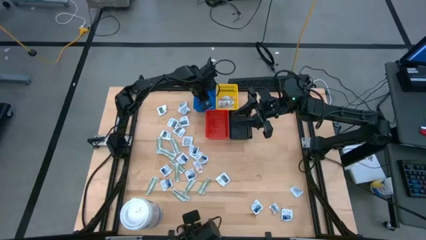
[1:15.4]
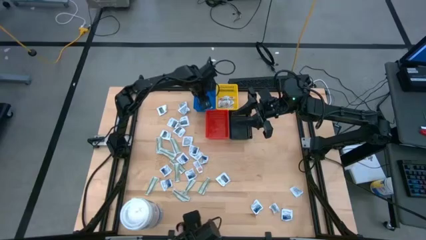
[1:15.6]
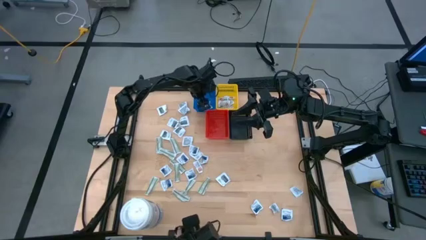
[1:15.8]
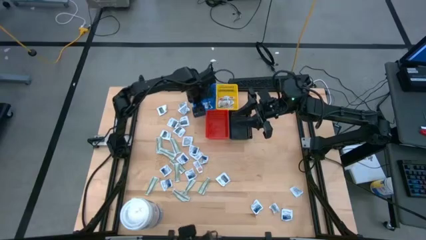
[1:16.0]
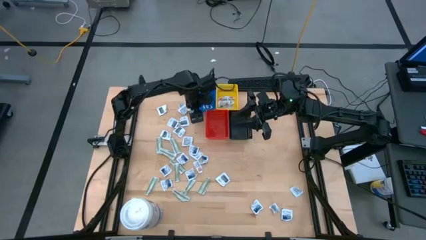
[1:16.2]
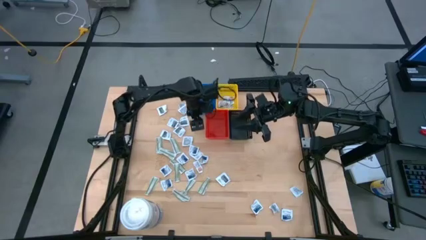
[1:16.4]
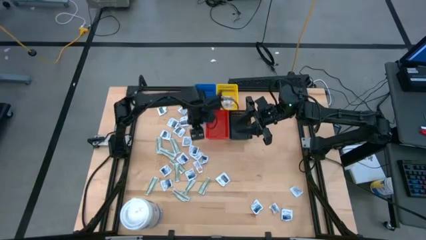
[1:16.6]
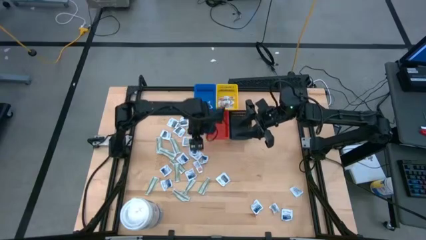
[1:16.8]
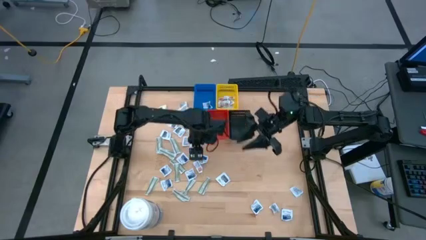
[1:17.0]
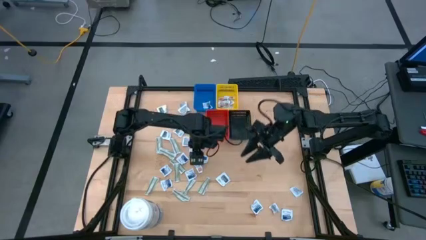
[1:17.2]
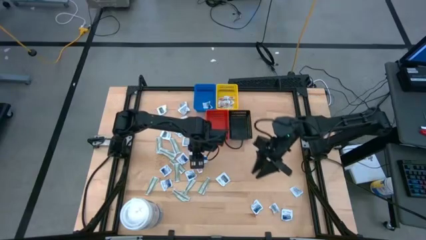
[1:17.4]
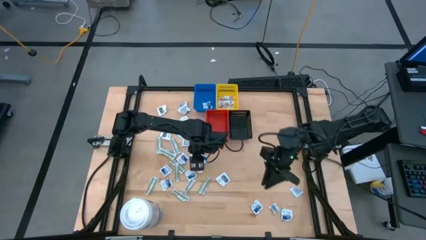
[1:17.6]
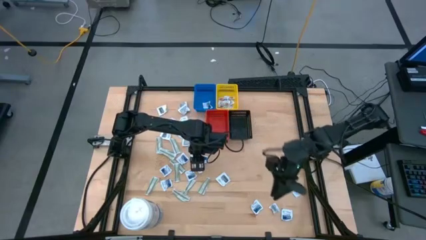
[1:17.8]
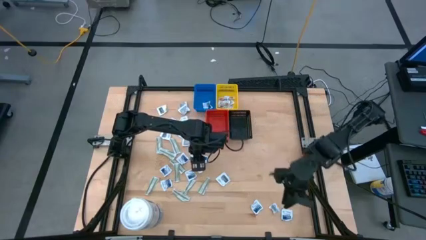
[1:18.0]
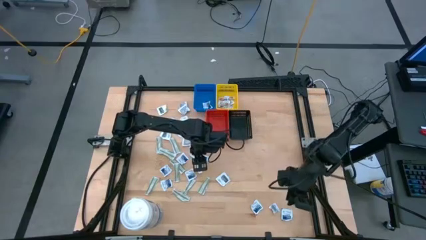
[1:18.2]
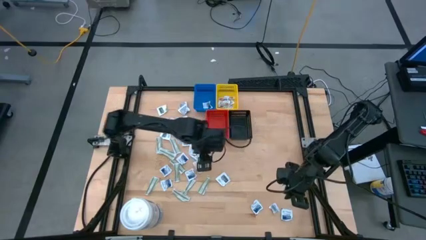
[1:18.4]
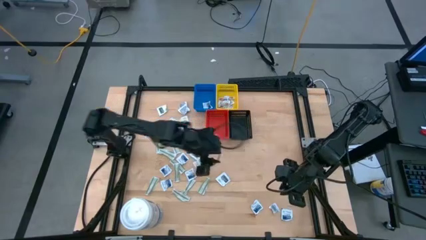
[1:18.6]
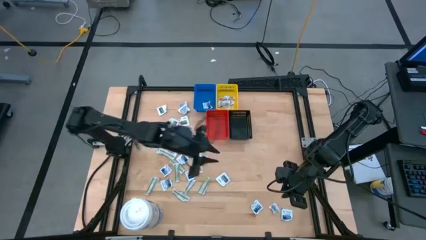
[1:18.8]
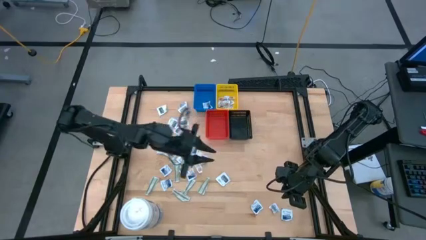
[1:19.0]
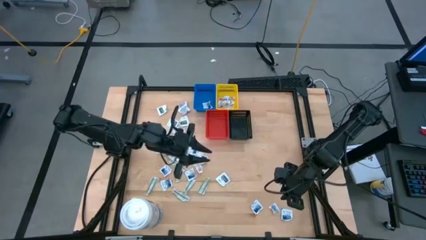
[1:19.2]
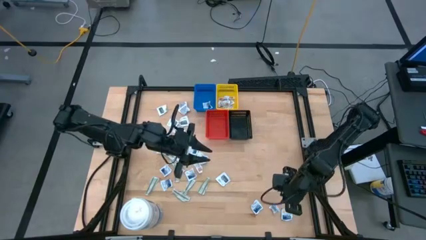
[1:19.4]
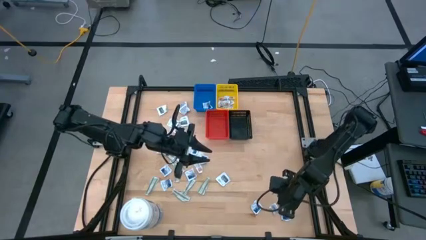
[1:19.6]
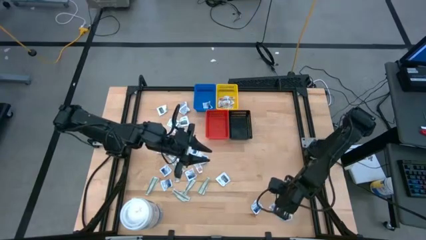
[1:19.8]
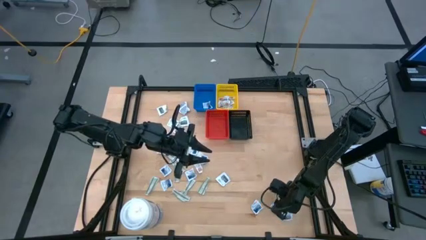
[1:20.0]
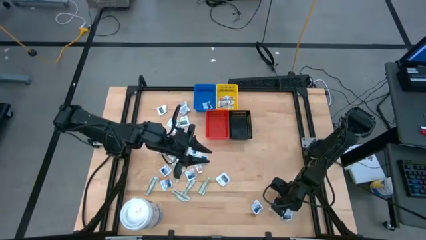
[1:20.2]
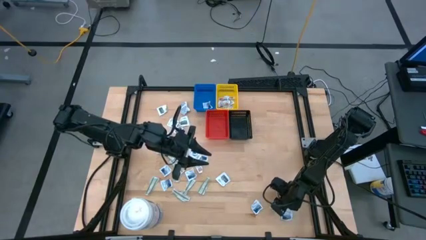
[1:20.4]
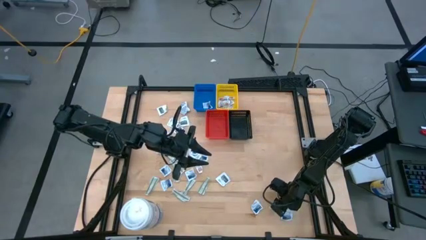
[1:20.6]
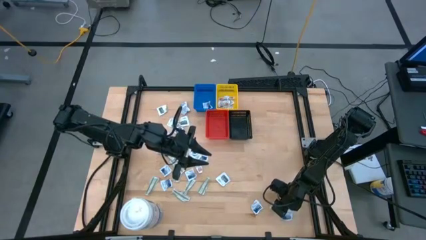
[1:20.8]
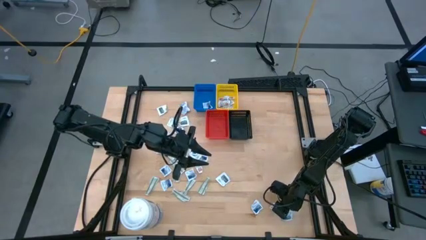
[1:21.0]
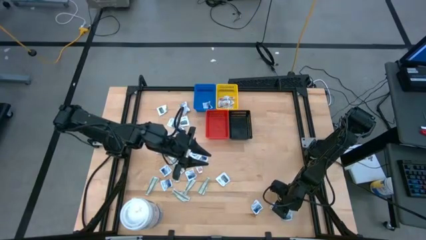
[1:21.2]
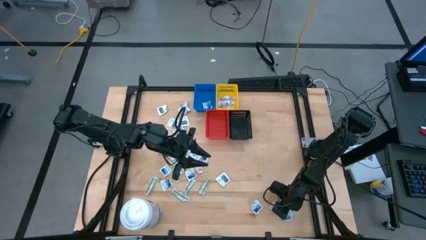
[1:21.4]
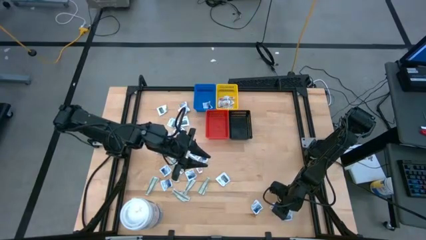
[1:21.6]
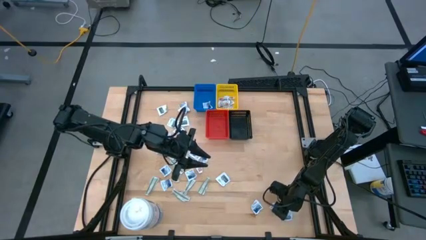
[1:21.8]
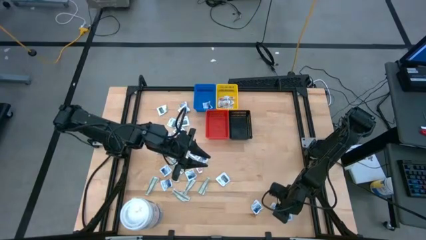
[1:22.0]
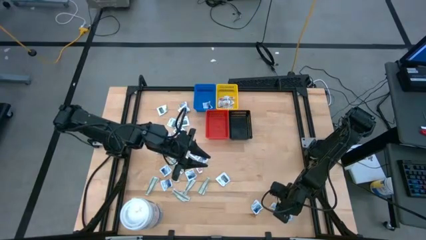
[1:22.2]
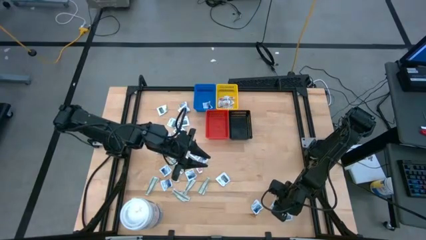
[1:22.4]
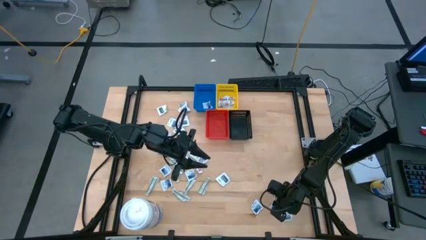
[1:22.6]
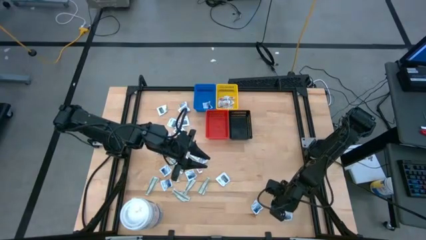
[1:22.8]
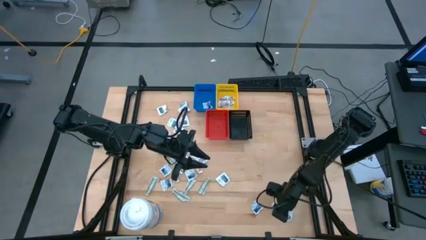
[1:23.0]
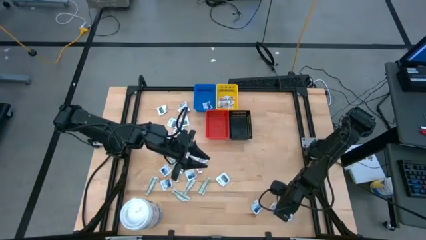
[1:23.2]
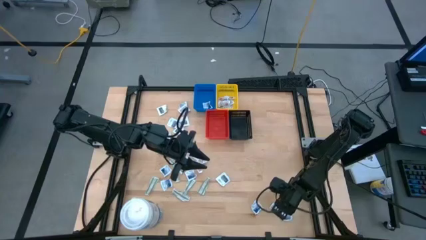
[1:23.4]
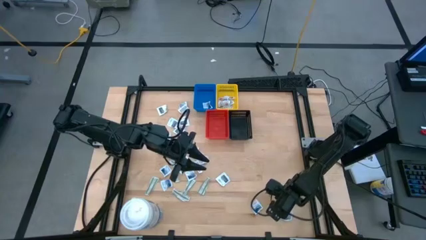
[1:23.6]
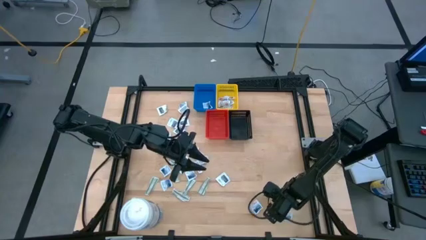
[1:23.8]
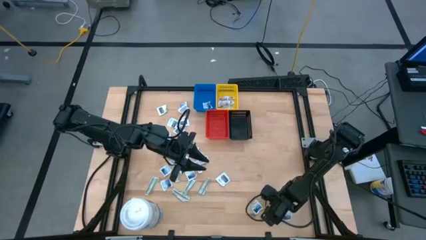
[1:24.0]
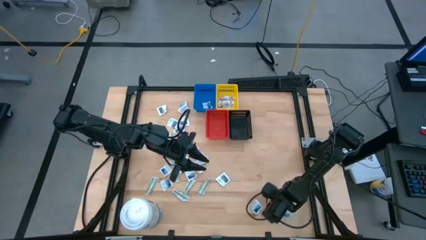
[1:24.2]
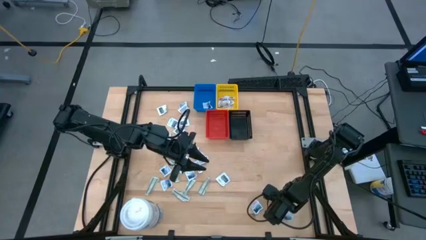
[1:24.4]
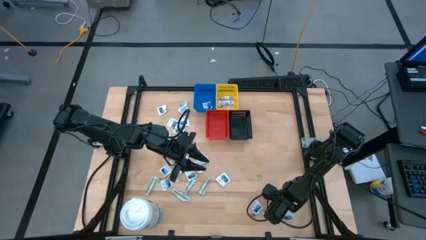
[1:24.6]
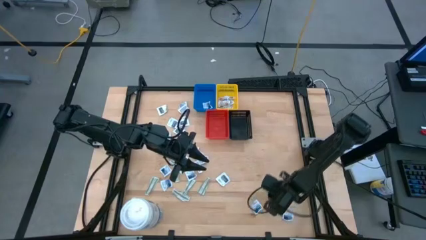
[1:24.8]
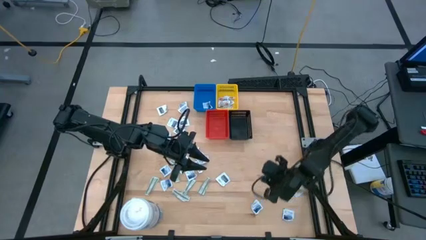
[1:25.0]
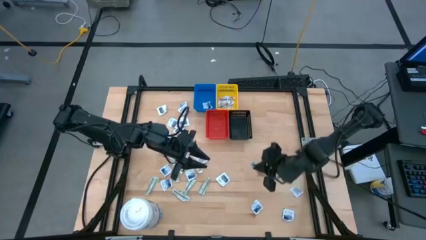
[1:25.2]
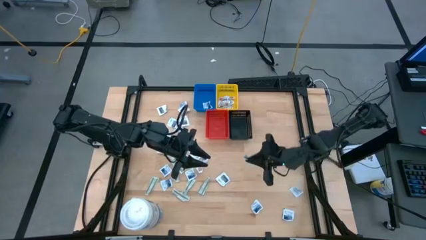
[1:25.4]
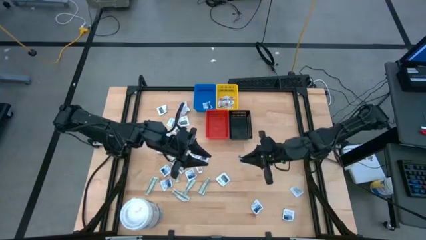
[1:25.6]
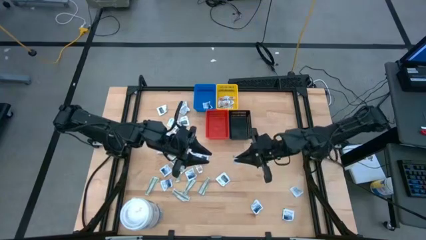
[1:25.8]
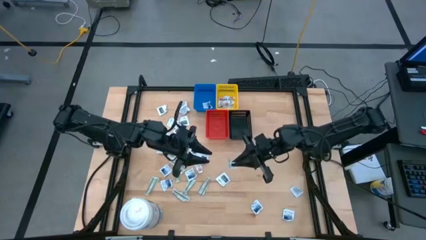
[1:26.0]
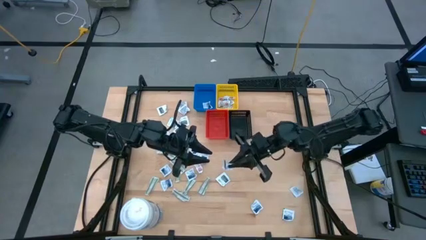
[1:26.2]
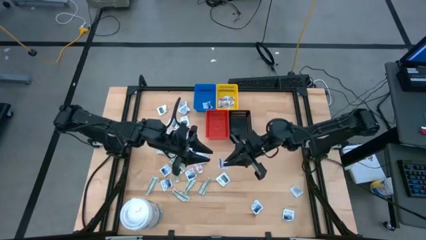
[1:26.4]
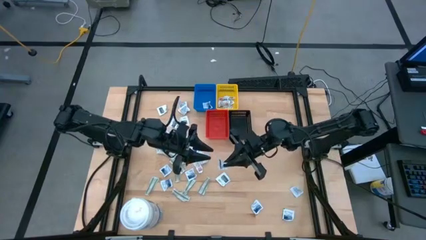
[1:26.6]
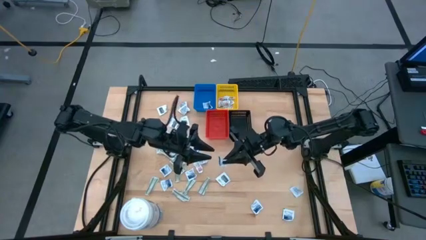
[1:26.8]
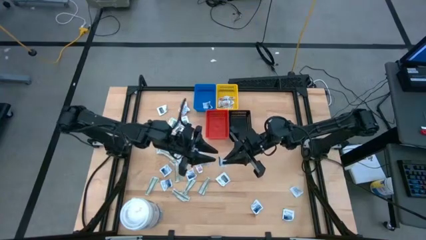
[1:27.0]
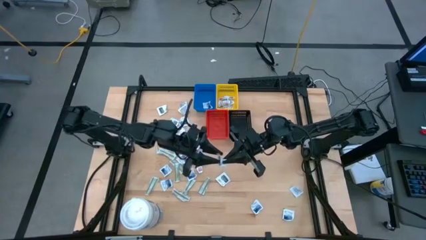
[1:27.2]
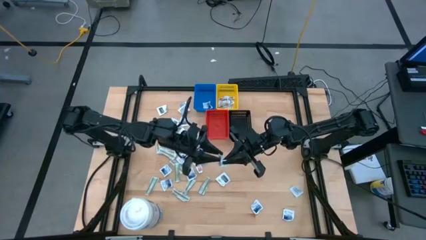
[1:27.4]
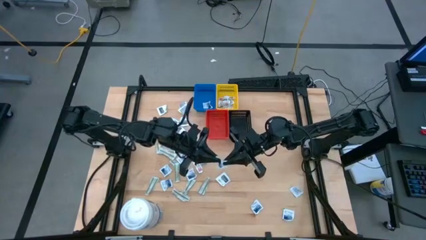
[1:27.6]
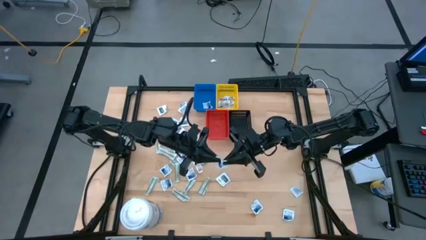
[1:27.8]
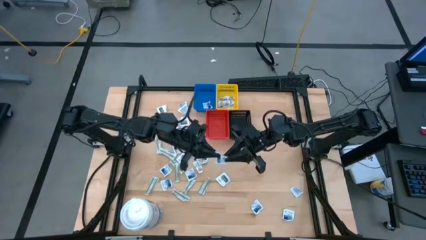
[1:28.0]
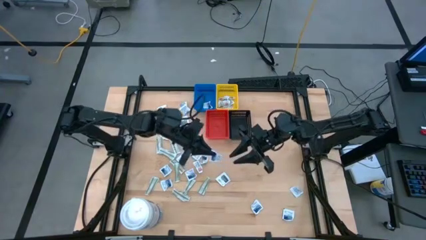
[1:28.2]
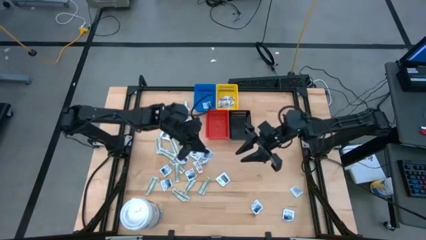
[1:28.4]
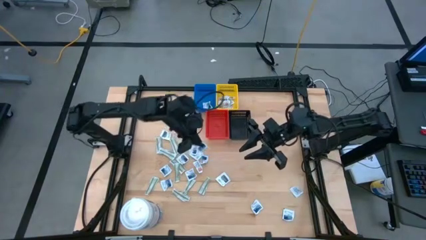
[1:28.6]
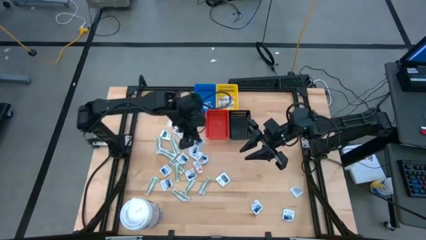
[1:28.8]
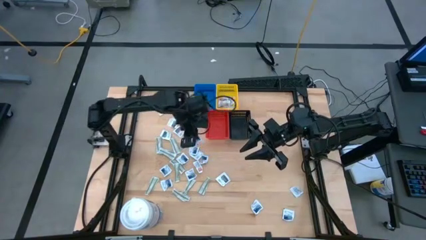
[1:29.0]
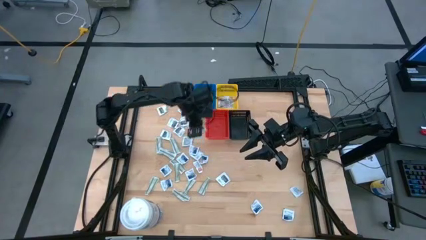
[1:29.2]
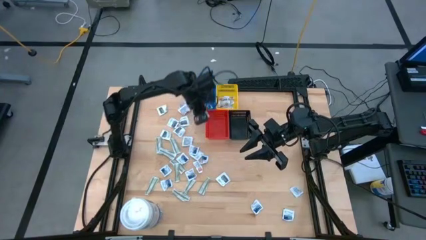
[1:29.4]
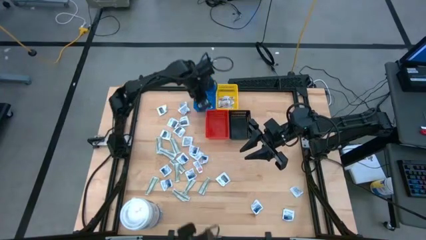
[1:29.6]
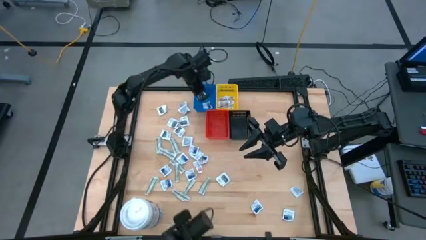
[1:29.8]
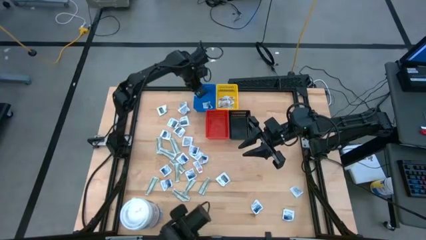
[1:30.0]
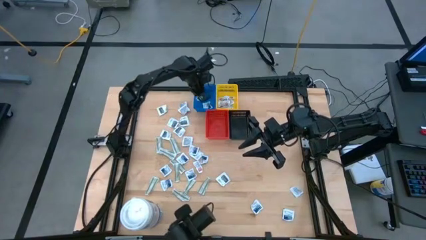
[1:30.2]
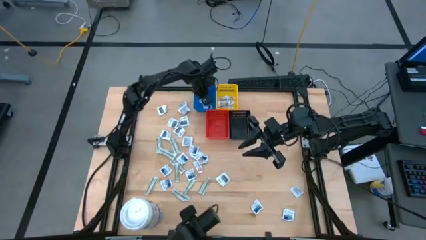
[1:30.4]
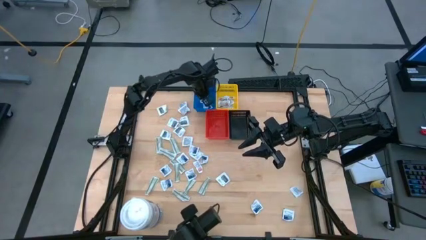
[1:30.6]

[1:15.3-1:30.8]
Task: Pick & Place First Aid Supplies
Put the alcohol pad into the blue bin
